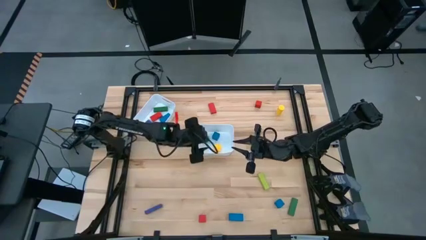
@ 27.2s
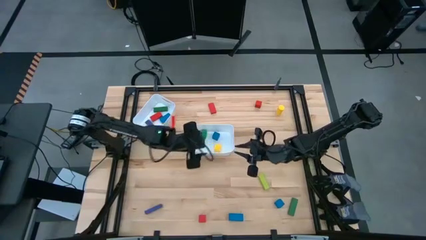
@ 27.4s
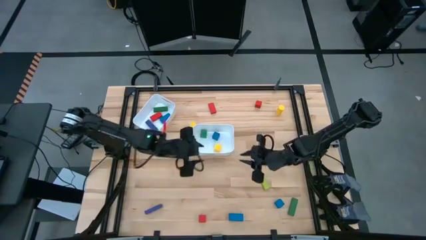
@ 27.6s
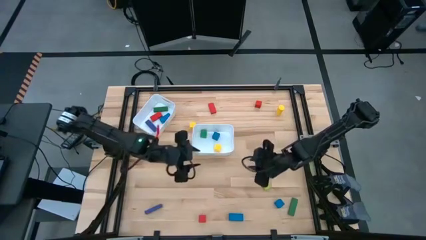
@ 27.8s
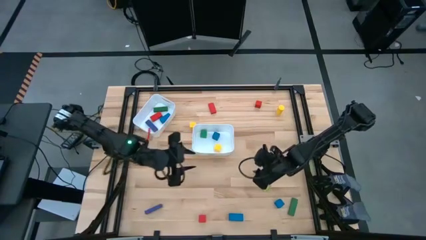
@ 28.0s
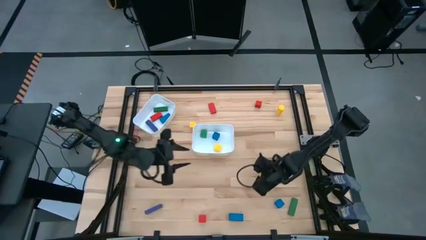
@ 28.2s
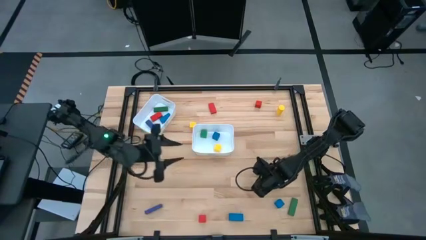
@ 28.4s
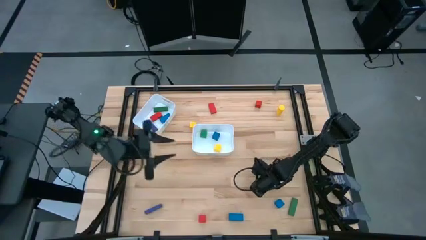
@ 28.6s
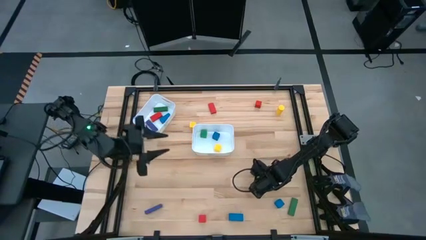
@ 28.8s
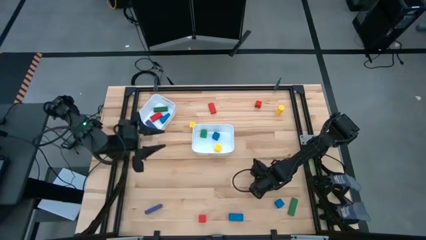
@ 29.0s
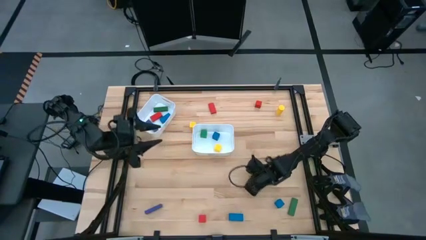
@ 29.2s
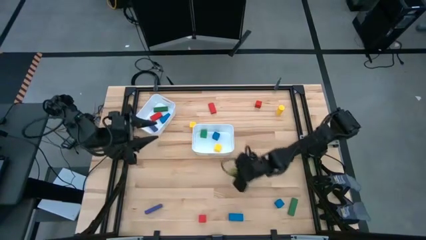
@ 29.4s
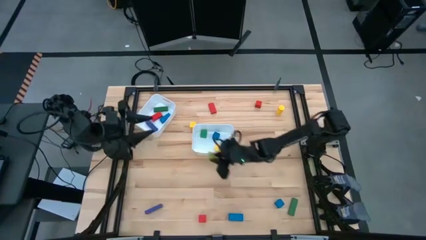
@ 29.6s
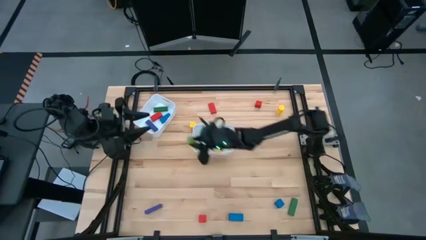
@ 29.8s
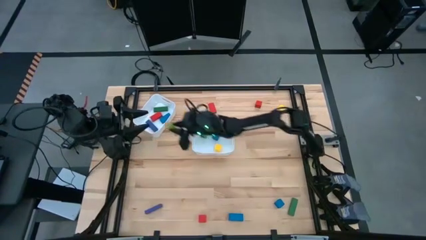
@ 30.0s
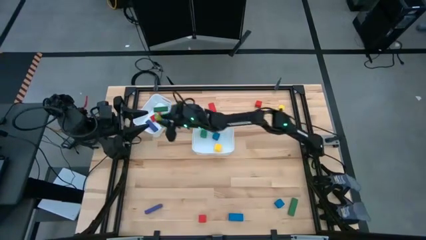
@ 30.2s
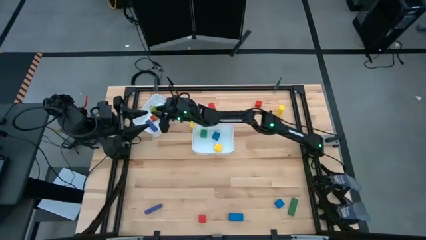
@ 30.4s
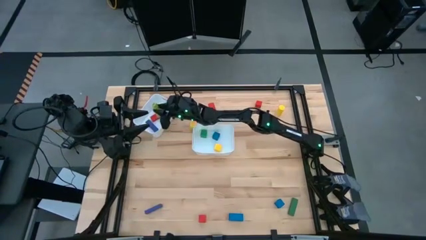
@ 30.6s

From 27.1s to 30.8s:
Task: Sort blocks by size
Put the light green large block into the top white bin

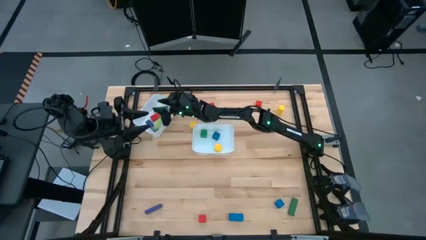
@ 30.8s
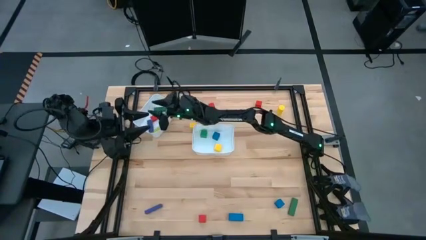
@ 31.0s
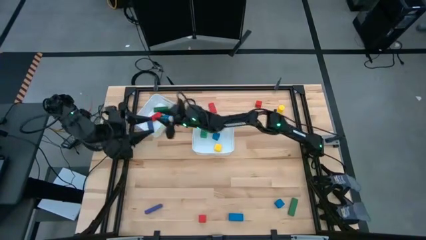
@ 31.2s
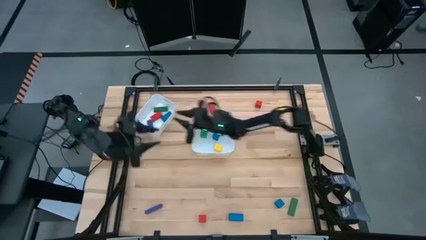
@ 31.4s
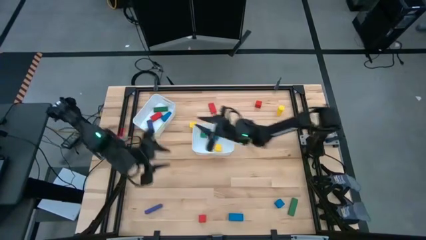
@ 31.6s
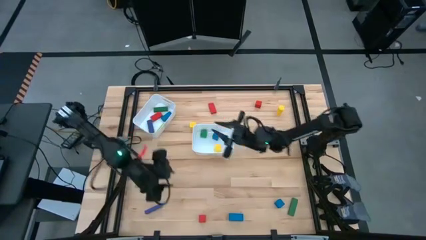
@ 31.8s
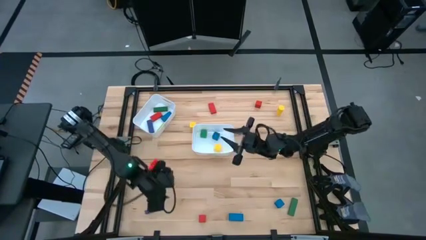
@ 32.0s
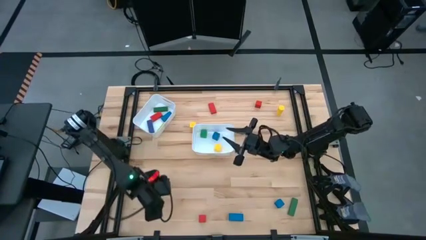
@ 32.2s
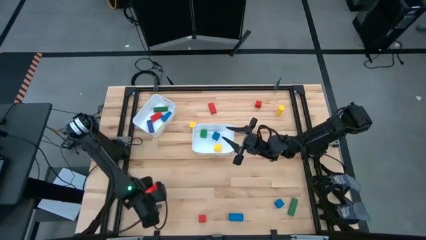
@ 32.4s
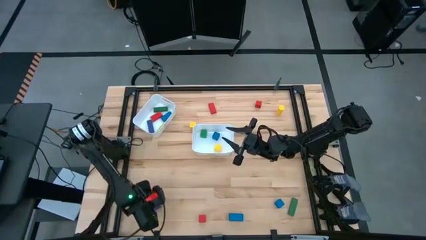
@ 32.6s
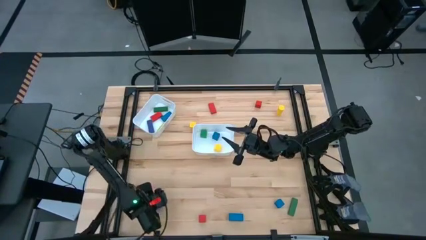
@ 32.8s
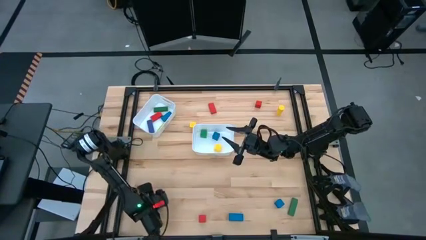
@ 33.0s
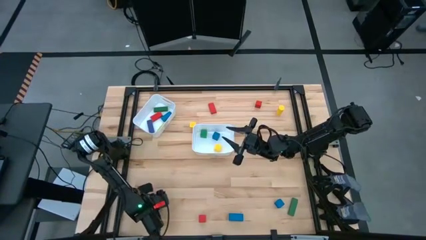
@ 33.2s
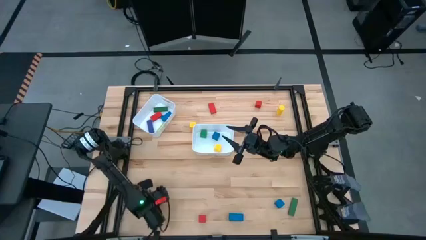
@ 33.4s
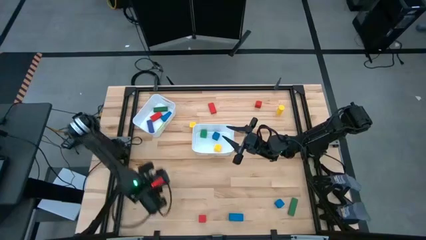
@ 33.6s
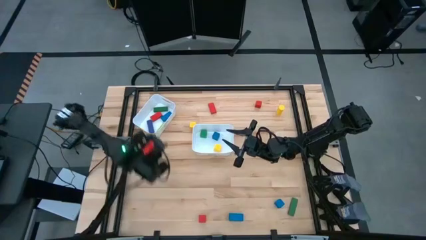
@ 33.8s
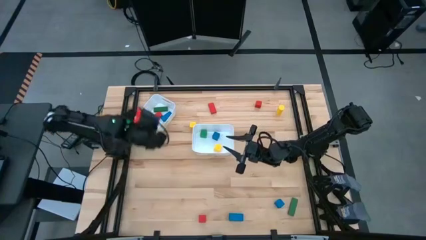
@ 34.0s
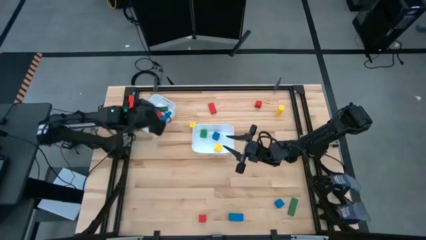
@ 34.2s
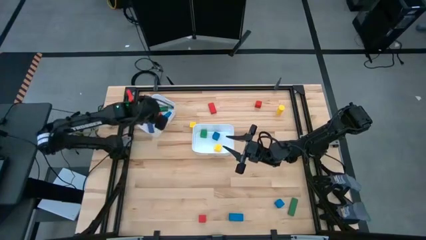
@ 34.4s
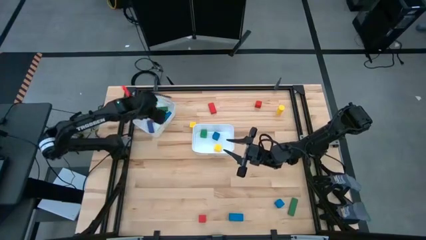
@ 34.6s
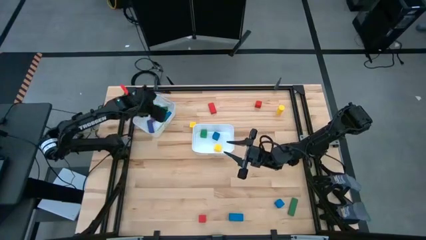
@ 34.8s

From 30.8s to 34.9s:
Put the violet large block into the top white bin

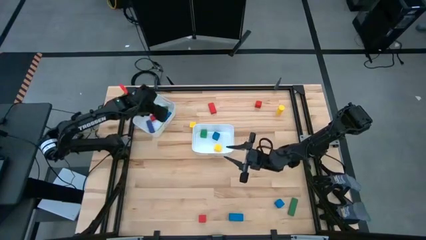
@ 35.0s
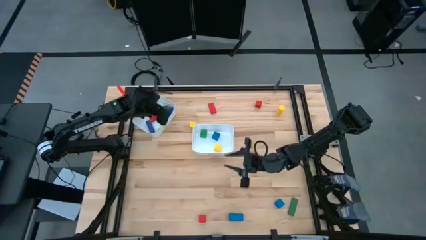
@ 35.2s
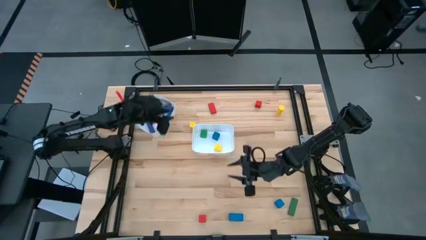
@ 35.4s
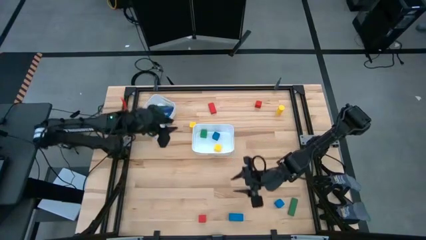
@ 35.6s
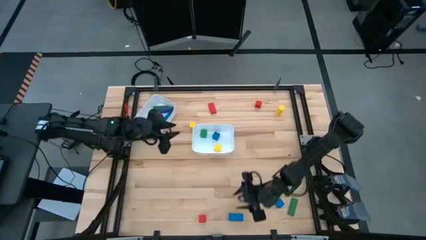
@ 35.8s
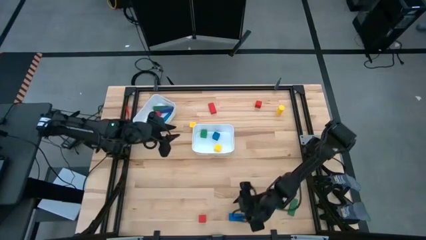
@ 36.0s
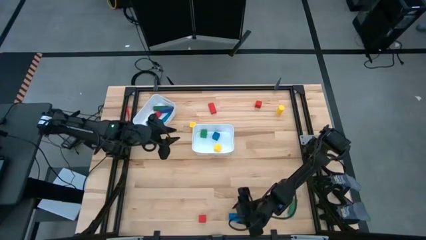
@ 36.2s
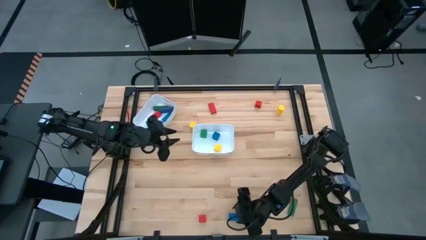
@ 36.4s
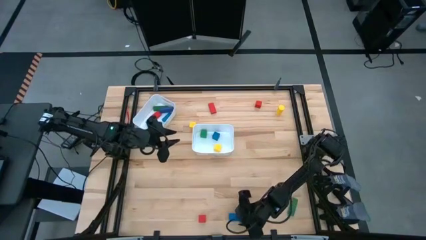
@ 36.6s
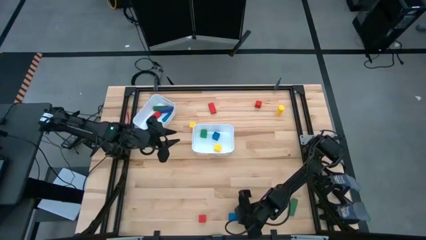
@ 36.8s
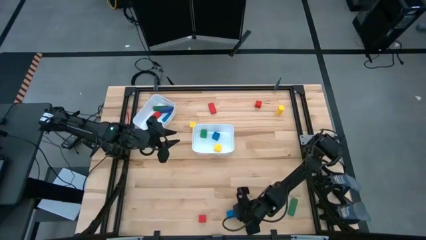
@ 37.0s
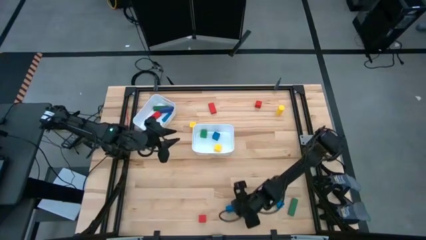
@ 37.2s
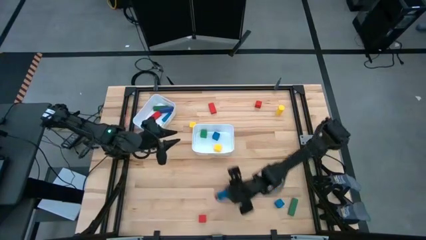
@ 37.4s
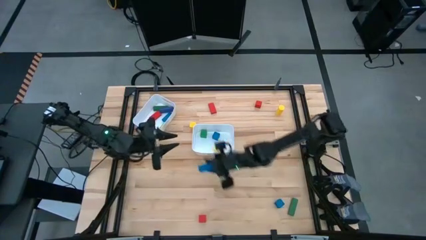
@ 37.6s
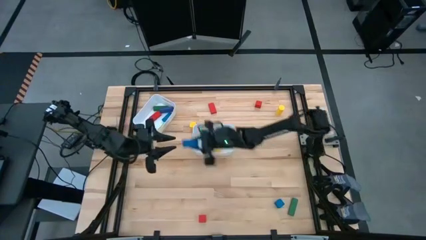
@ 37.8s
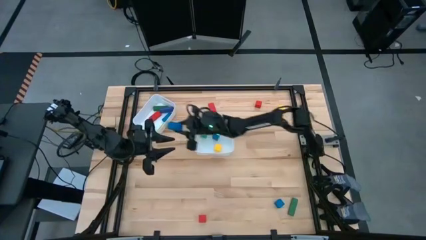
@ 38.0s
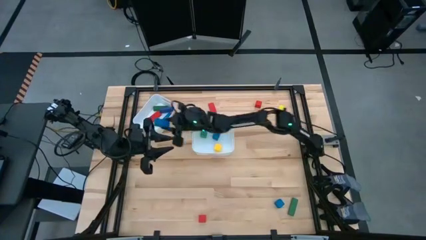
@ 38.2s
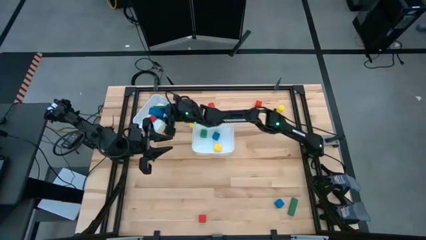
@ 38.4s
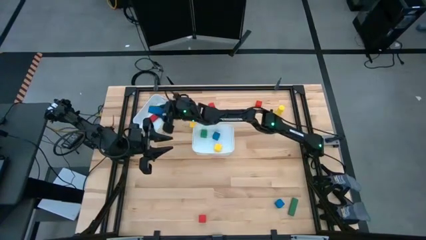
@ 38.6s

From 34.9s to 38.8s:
Put the blue large block into the top white bin

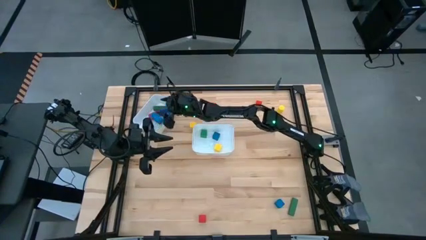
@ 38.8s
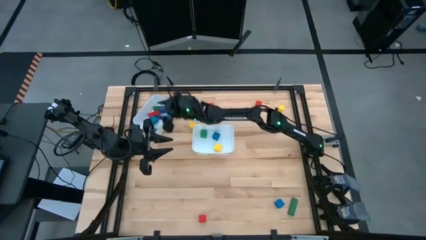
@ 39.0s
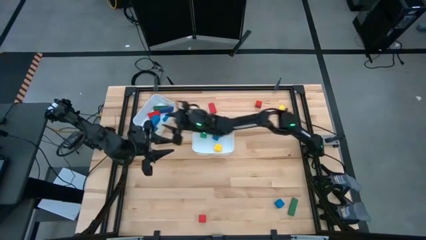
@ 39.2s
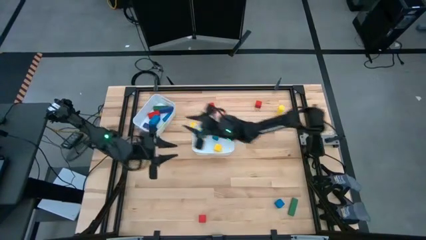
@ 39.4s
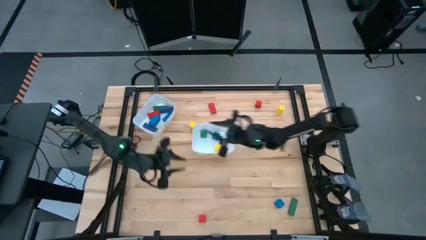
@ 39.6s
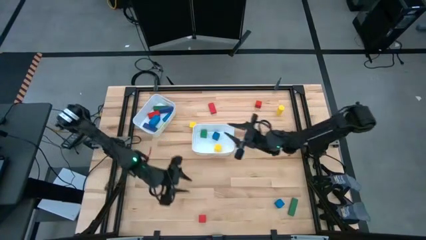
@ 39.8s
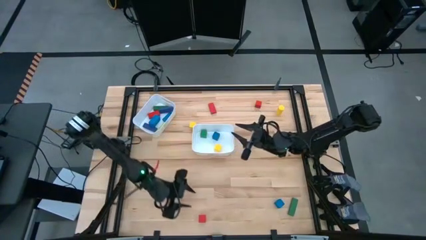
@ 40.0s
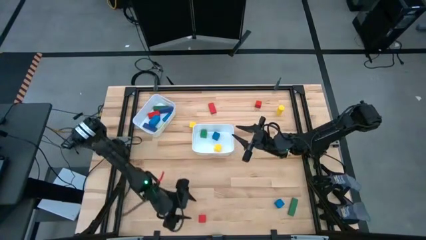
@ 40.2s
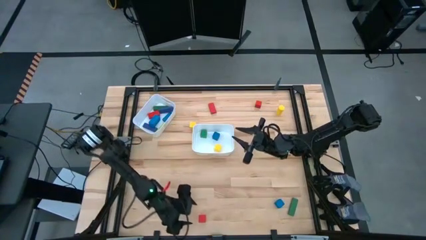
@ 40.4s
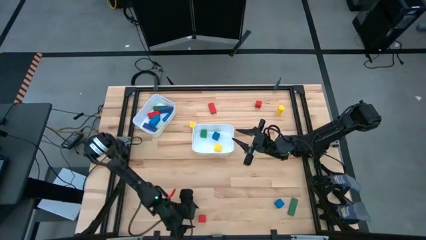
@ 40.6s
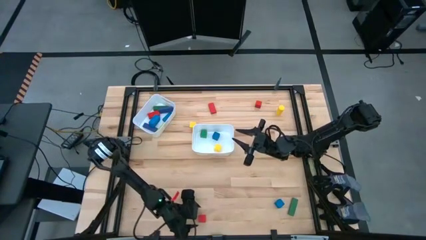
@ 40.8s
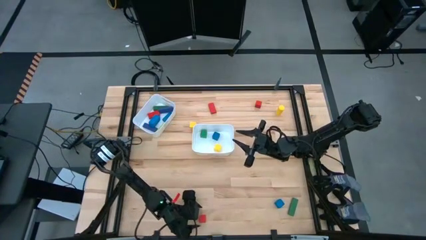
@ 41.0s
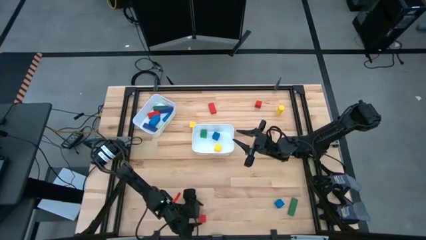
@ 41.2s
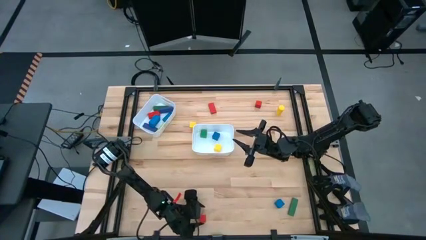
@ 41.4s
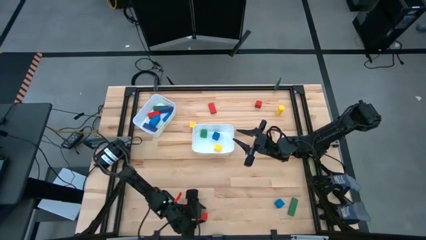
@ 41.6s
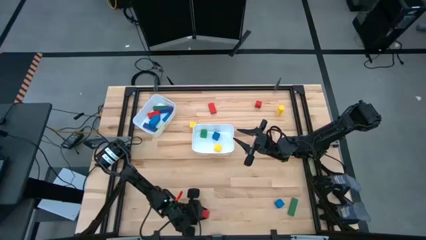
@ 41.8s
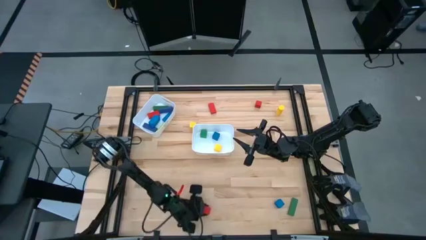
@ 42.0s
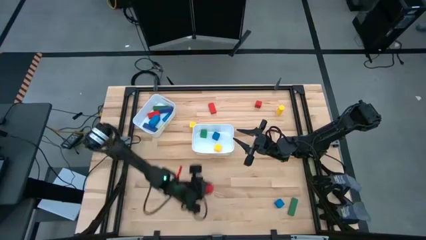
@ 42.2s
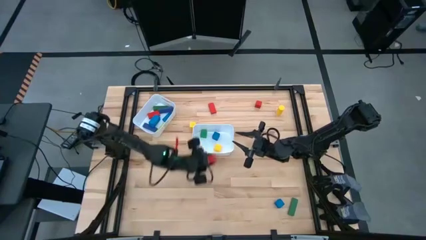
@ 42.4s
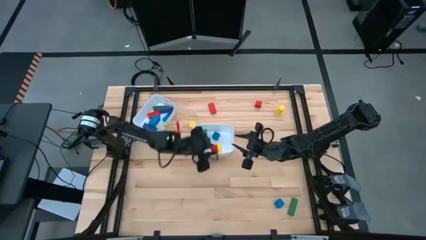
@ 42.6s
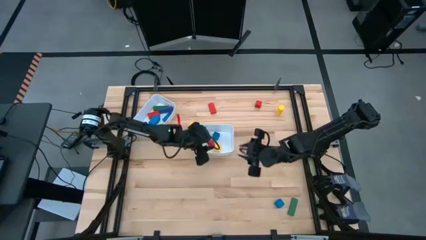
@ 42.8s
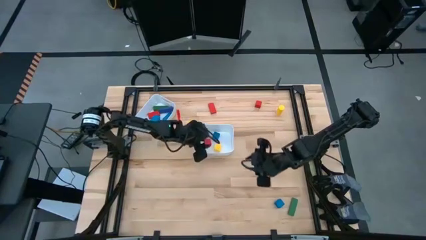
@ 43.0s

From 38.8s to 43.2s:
Put the bottom red small block into the bottom white bin

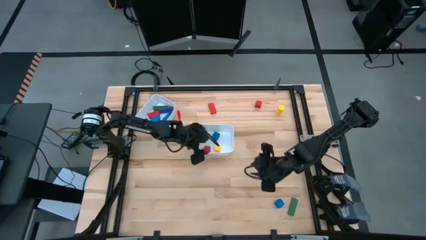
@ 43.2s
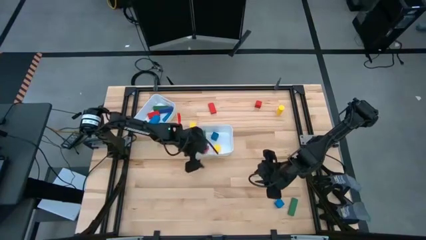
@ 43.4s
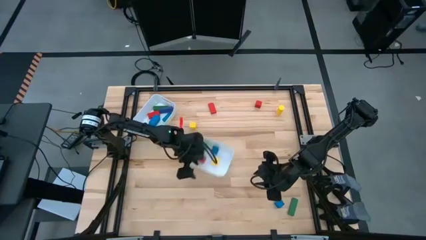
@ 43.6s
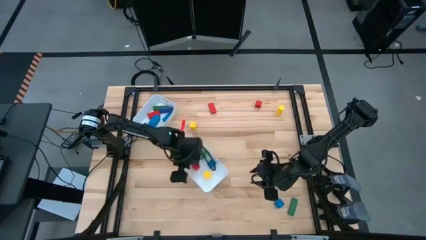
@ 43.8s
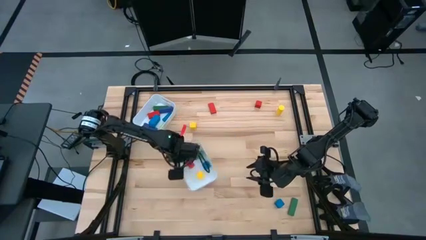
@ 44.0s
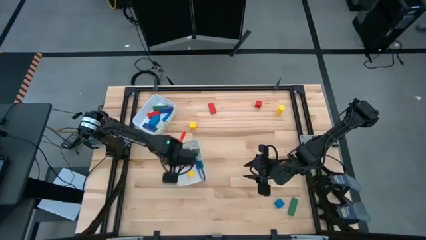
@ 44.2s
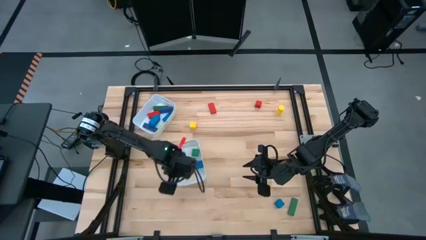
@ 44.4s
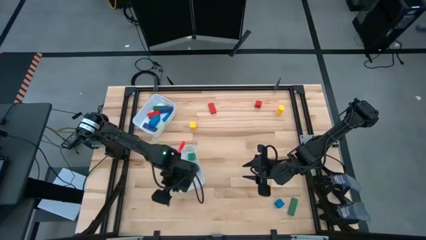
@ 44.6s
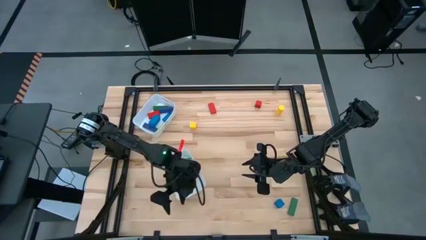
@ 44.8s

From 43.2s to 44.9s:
Adjust the bottom white bin on the table
